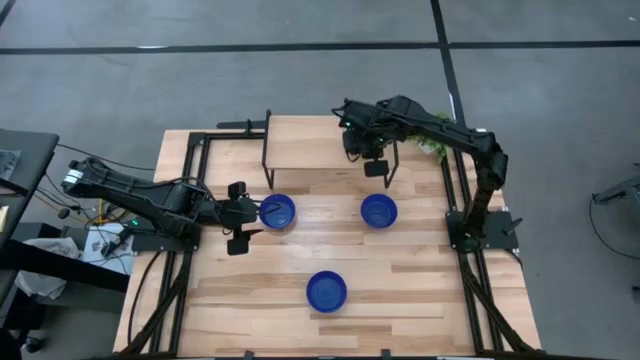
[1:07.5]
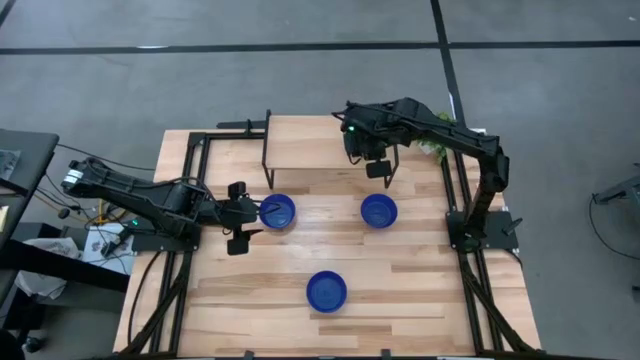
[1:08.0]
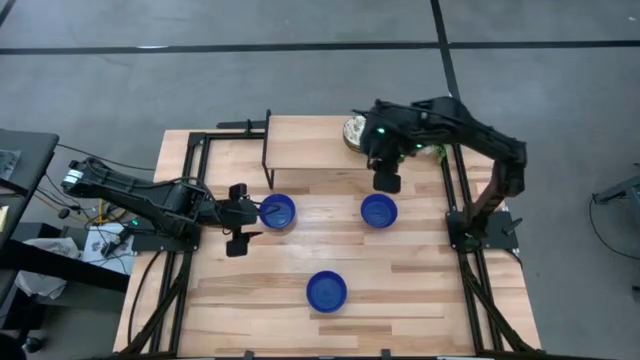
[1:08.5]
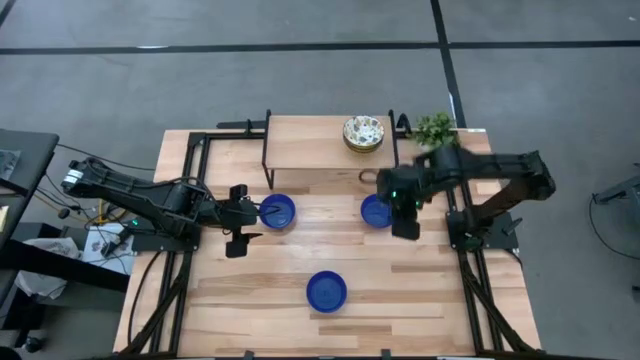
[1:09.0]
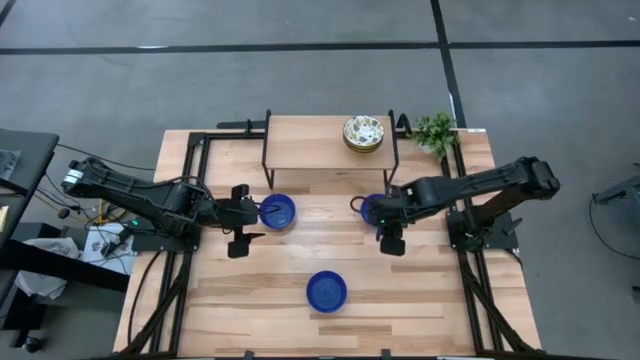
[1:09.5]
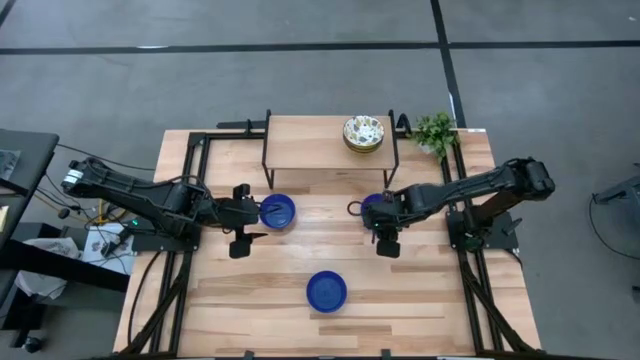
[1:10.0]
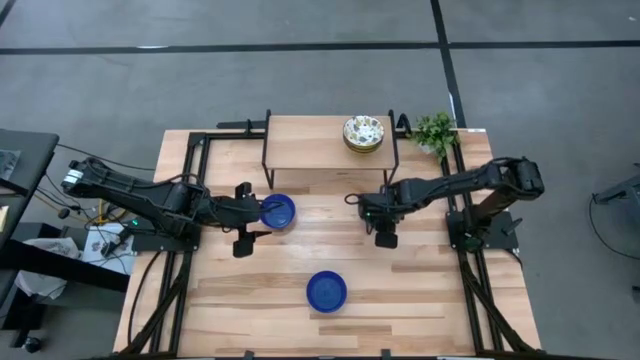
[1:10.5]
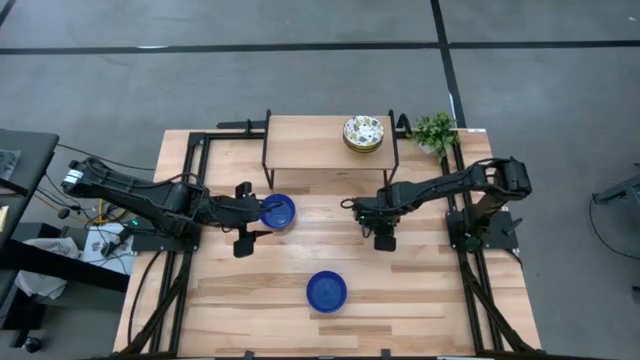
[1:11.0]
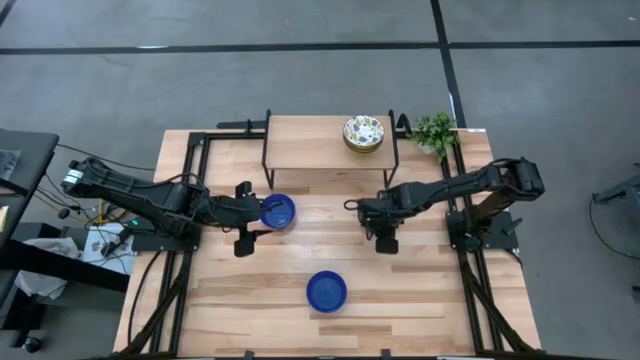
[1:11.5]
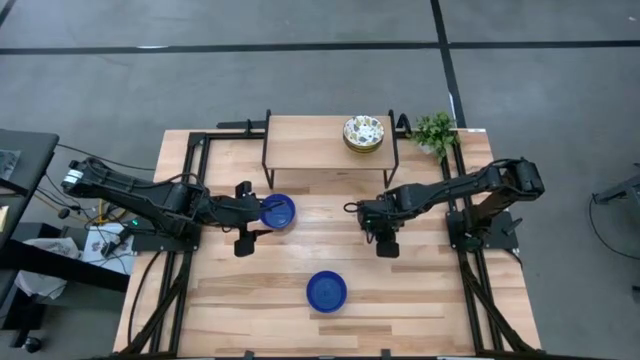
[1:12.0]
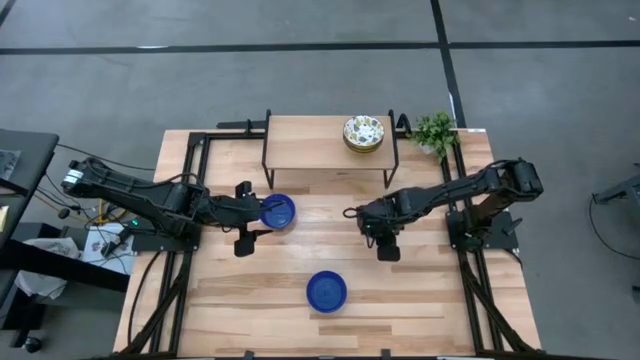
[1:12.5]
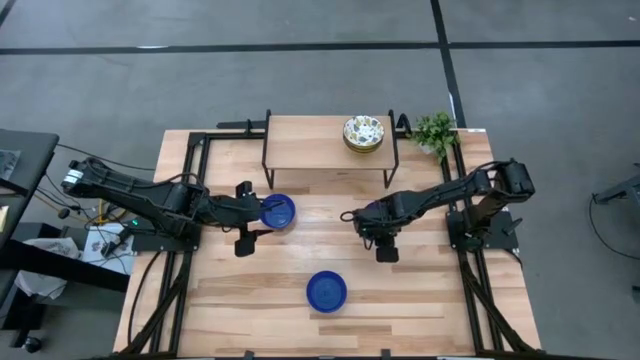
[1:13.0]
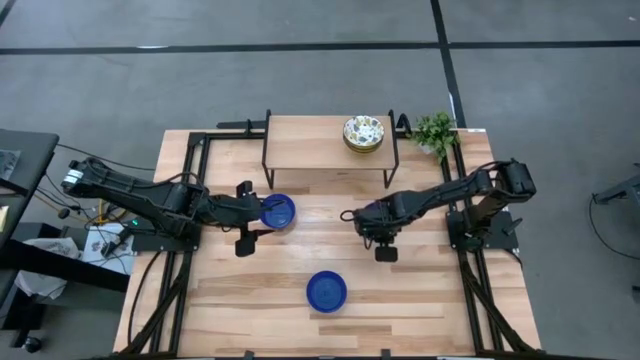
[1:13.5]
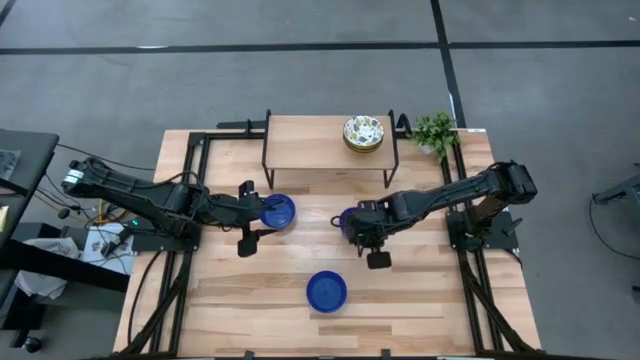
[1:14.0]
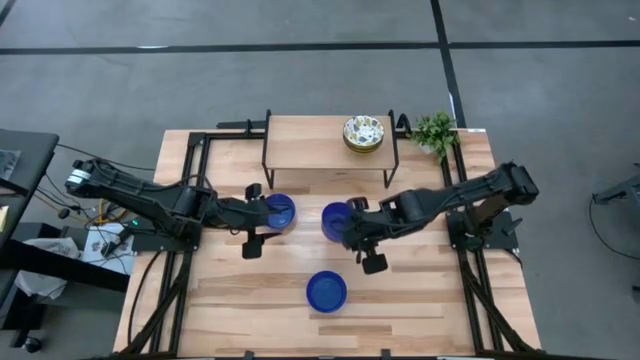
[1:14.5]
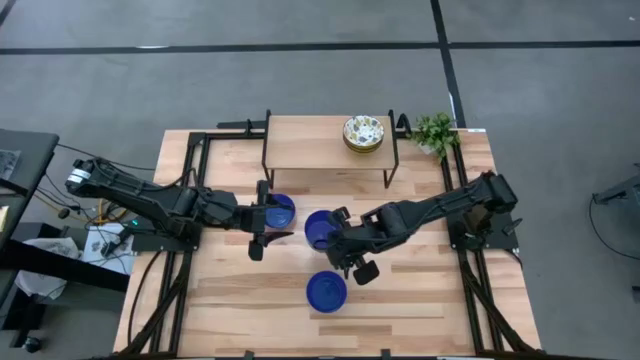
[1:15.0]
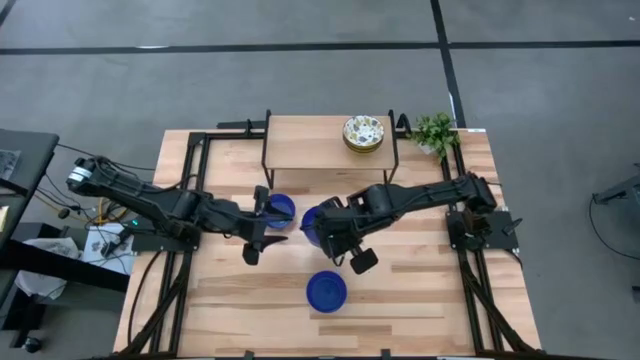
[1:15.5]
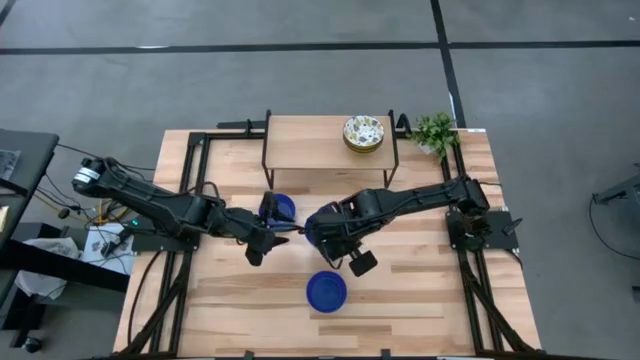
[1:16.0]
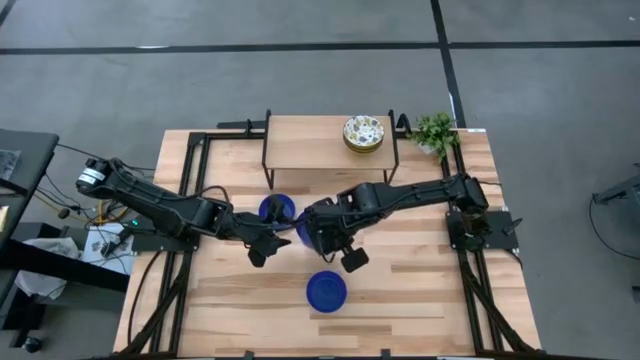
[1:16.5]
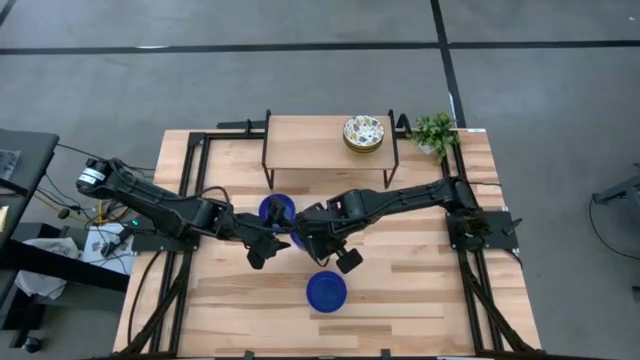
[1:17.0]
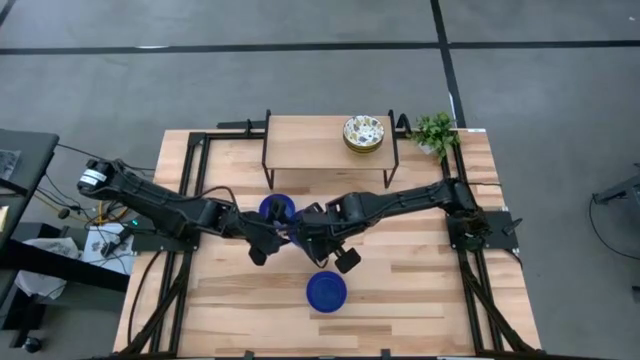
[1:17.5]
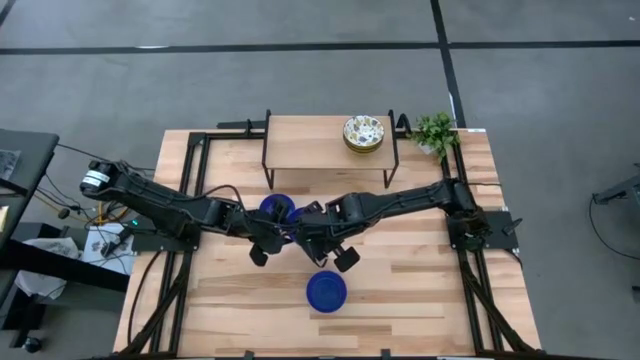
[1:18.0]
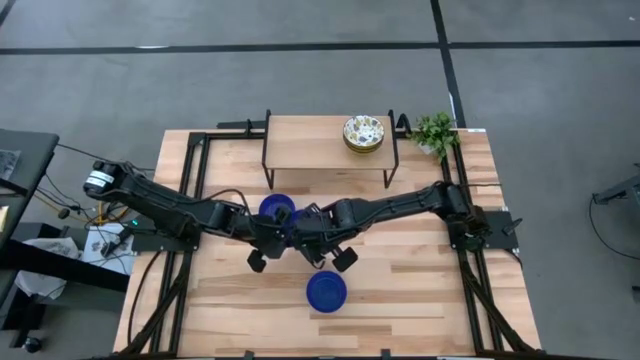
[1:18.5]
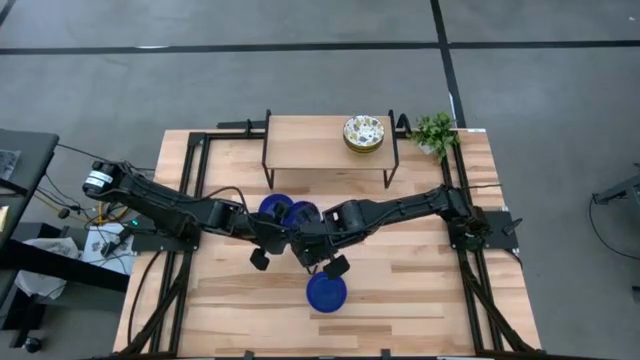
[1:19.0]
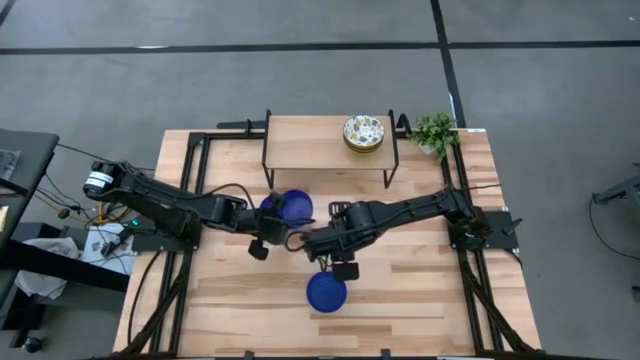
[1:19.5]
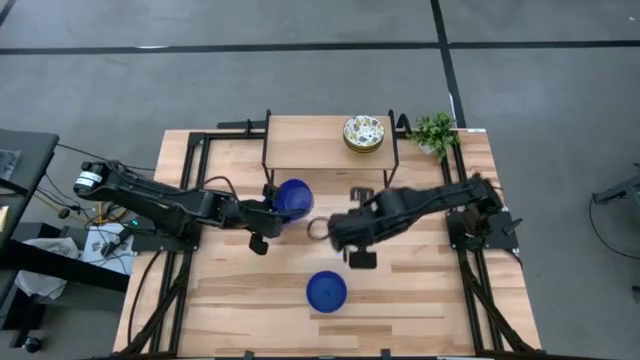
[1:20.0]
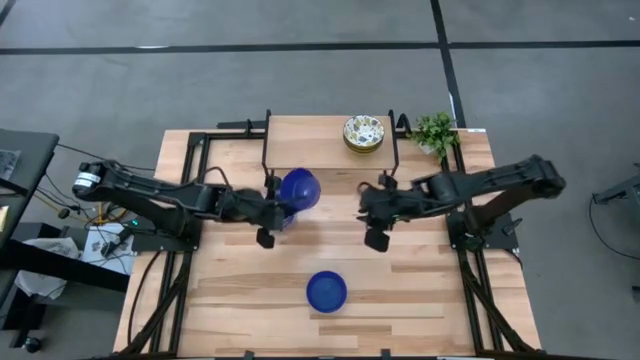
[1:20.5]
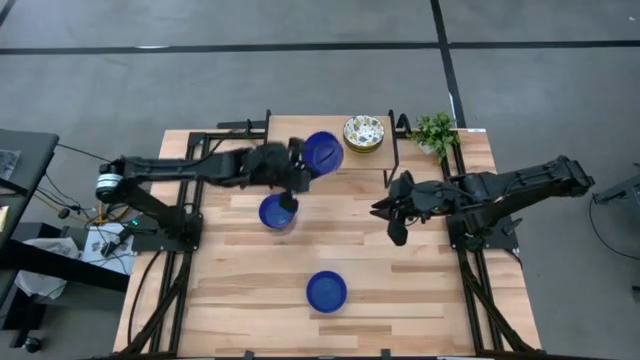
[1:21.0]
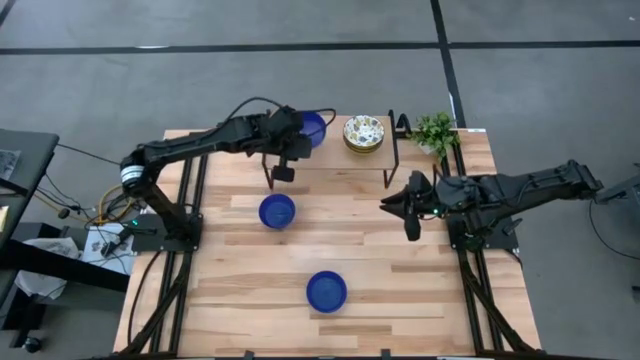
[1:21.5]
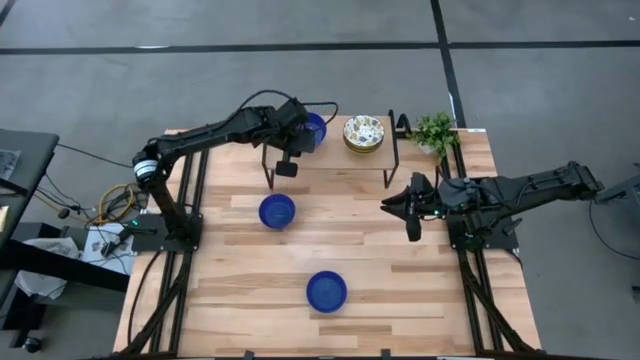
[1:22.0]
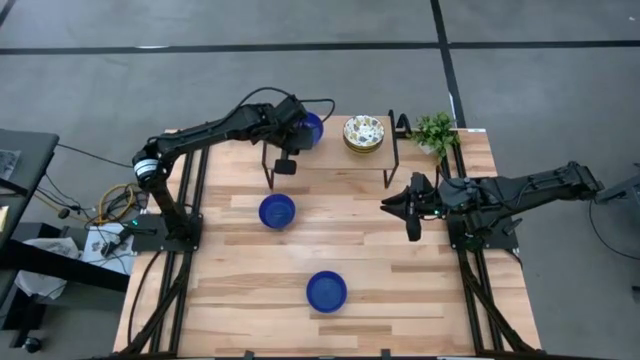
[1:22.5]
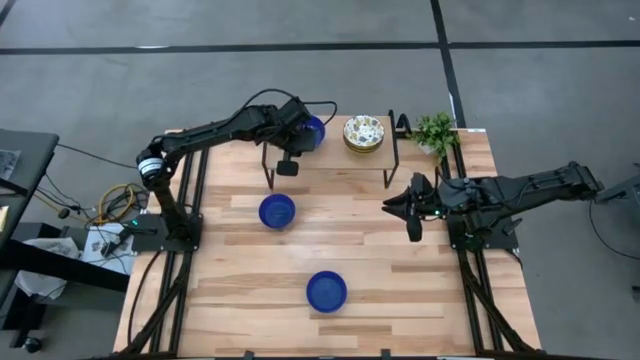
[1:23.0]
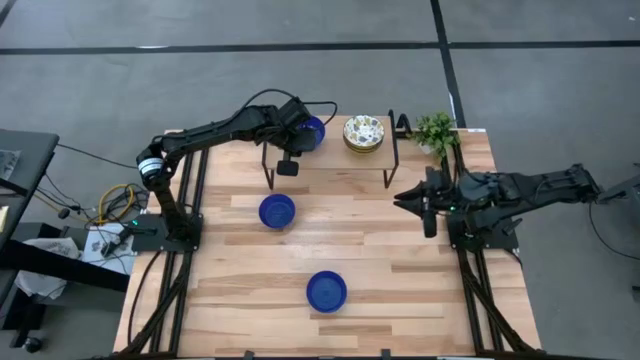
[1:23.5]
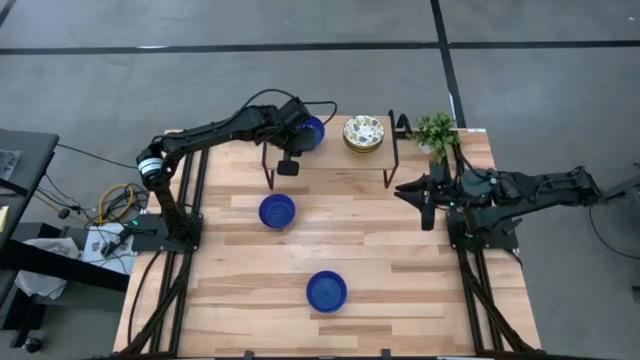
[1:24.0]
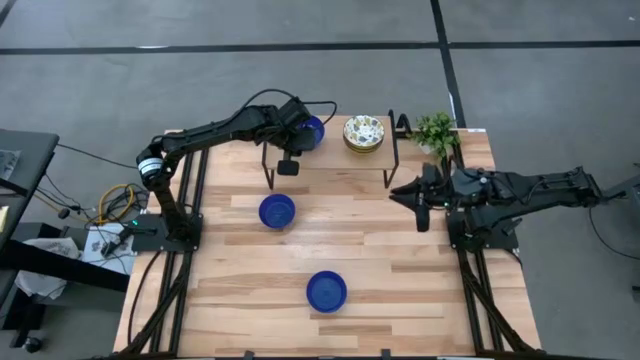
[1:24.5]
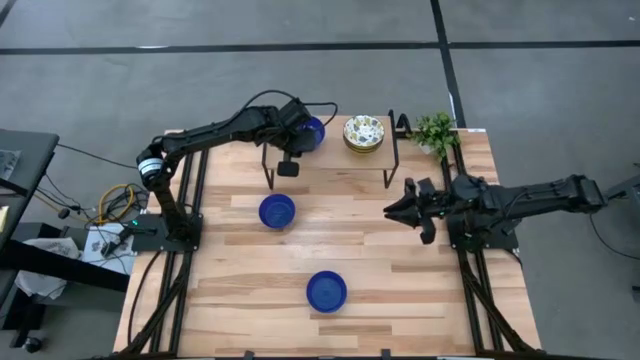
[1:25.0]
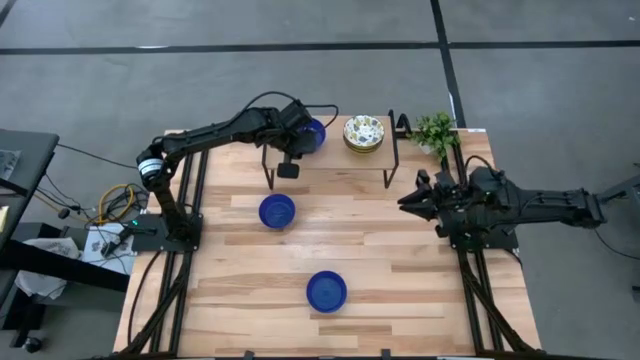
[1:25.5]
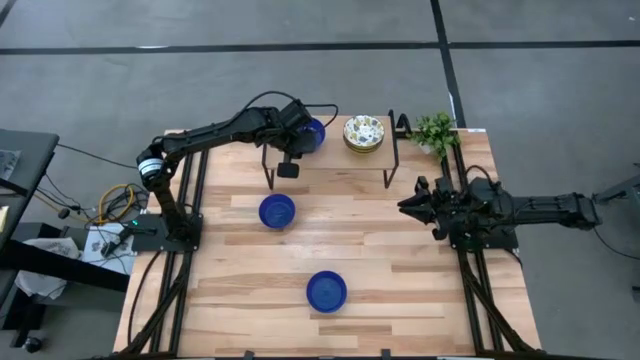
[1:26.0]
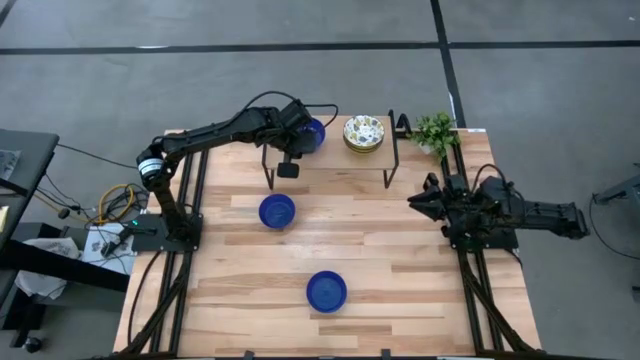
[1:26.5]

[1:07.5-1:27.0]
Task: Pick & Place Mini bowls
Put the right blue bowl on the shelf

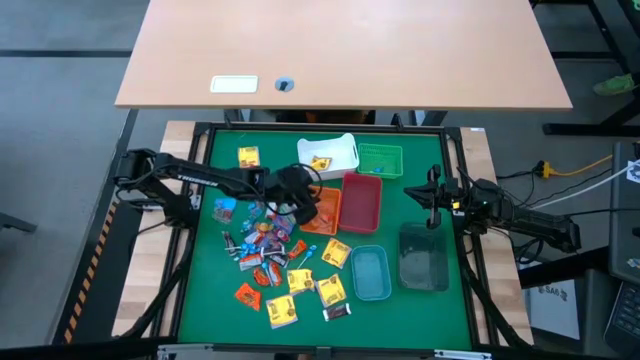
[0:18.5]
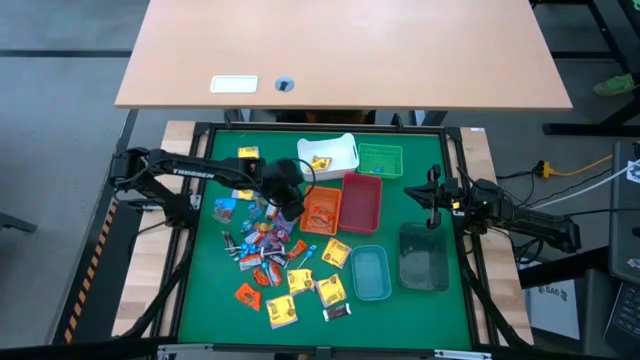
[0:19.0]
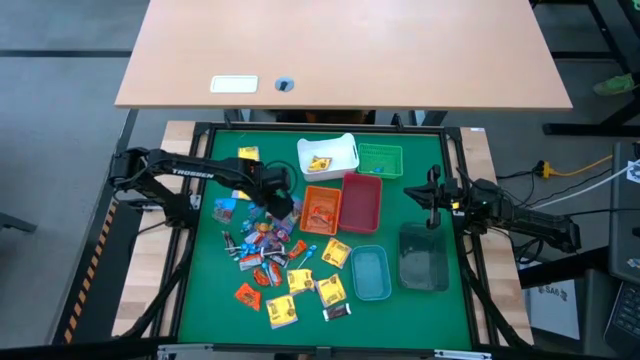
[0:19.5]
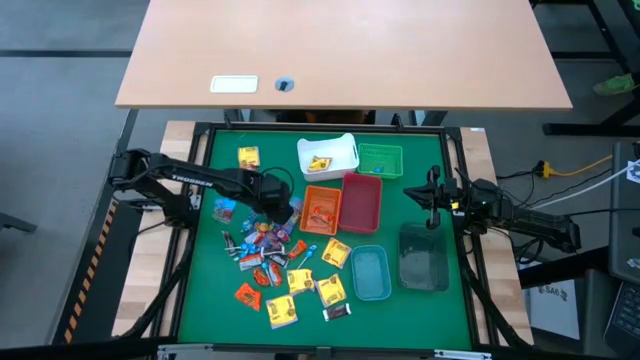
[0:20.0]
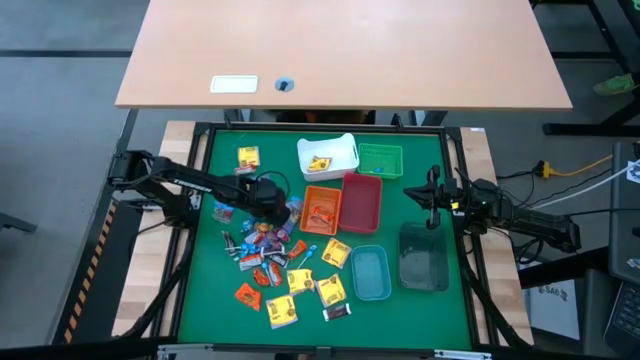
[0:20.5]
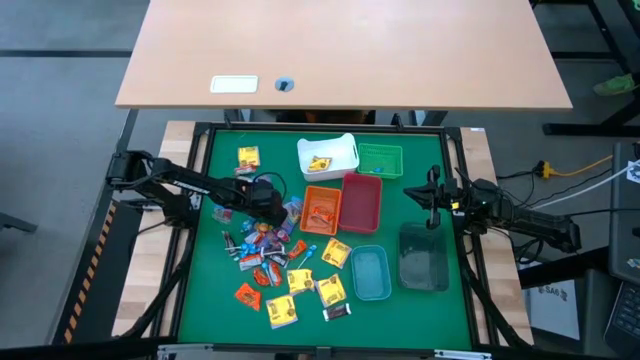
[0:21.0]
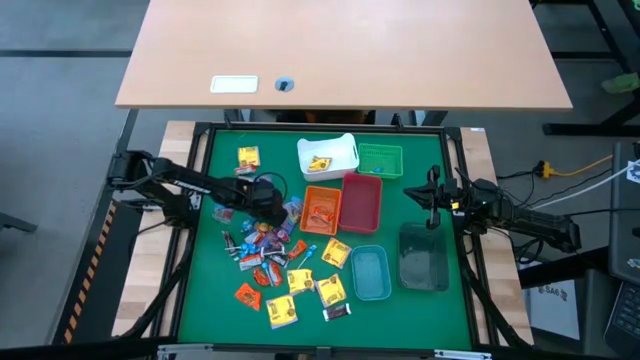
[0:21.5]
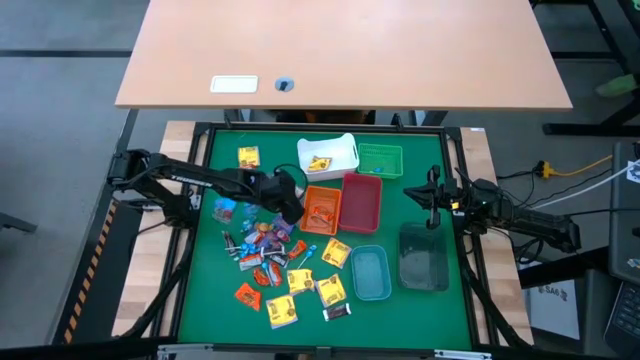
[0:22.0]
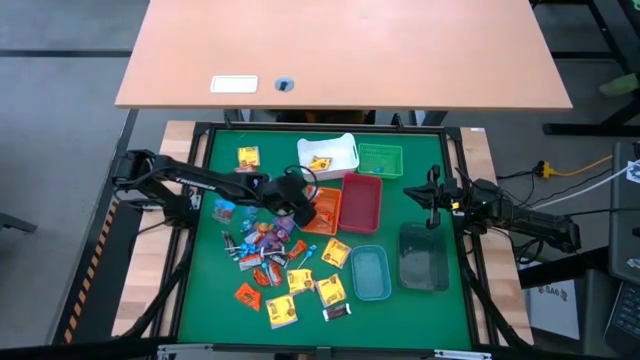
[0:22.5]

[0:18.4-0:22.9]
Task: Sort candy
Put the orange chocolate into the orange basket
